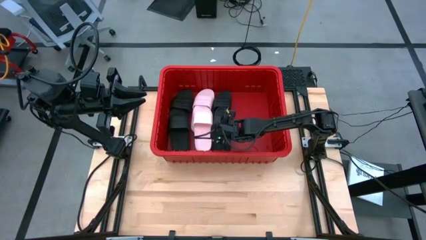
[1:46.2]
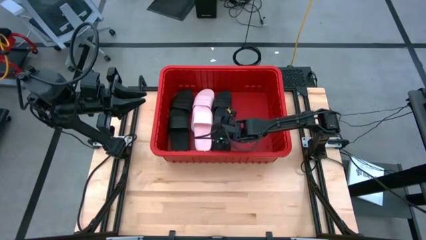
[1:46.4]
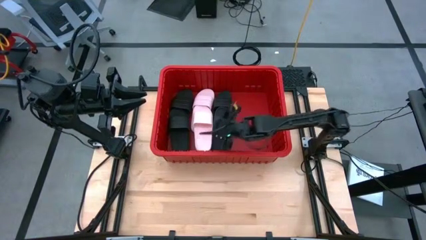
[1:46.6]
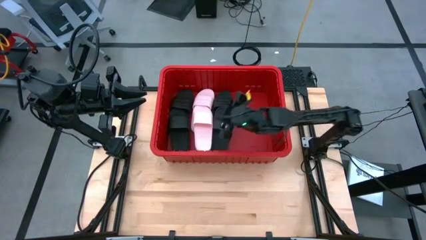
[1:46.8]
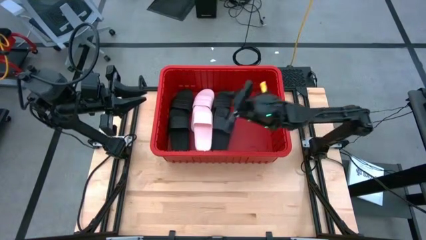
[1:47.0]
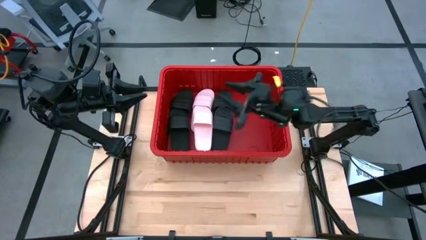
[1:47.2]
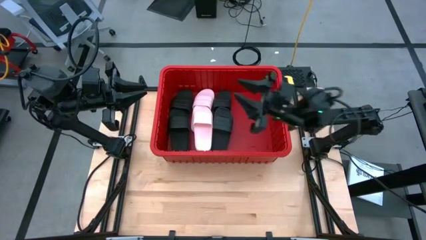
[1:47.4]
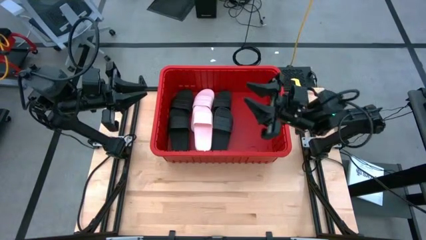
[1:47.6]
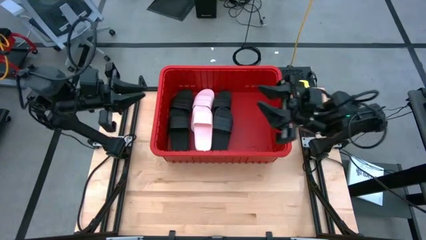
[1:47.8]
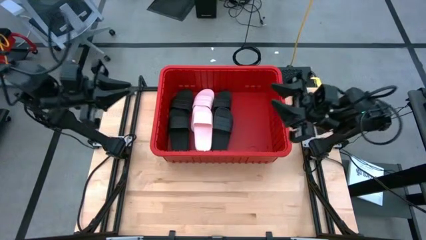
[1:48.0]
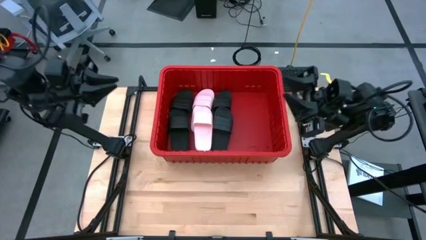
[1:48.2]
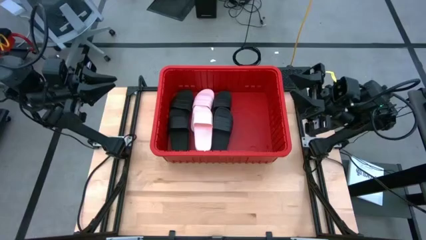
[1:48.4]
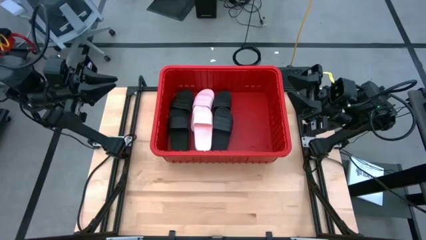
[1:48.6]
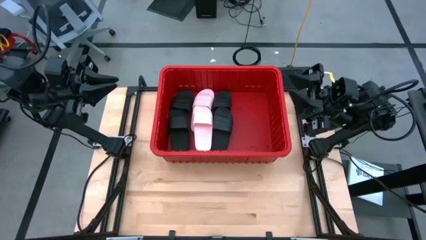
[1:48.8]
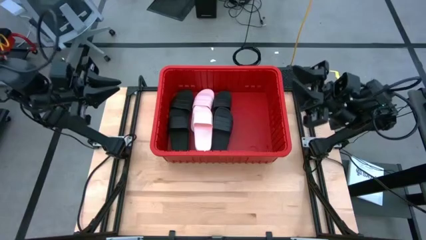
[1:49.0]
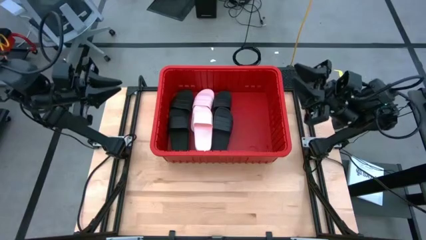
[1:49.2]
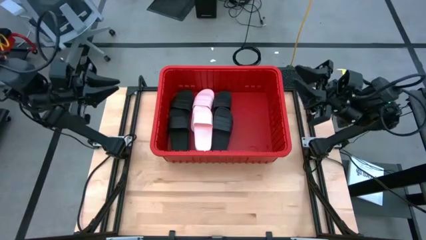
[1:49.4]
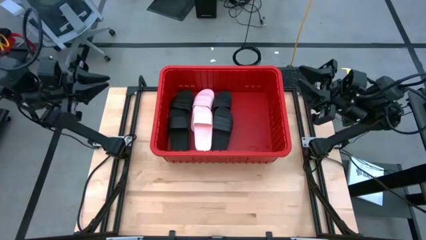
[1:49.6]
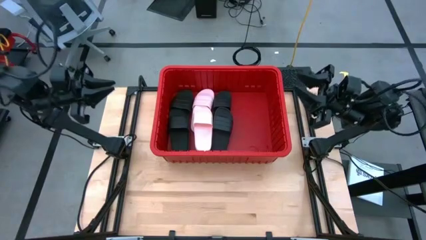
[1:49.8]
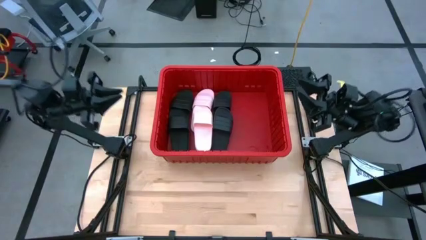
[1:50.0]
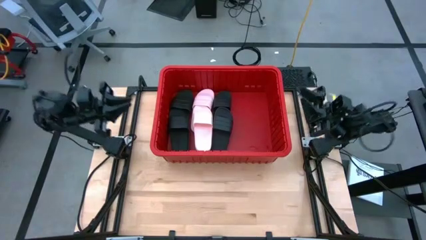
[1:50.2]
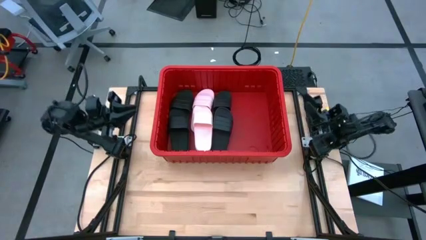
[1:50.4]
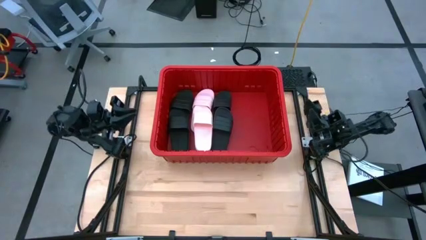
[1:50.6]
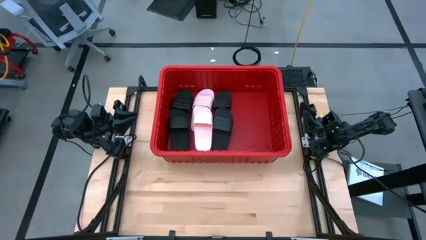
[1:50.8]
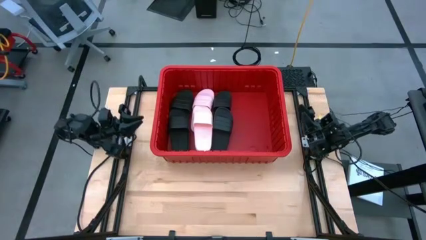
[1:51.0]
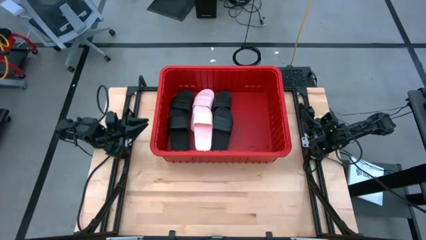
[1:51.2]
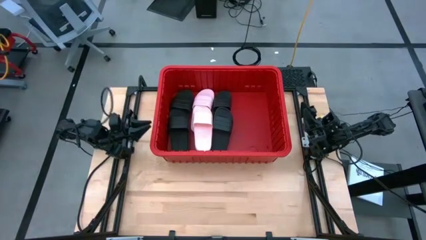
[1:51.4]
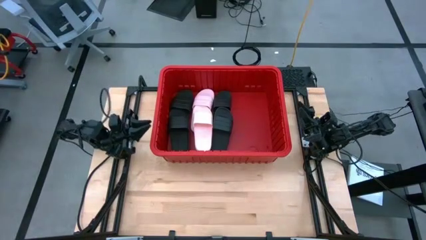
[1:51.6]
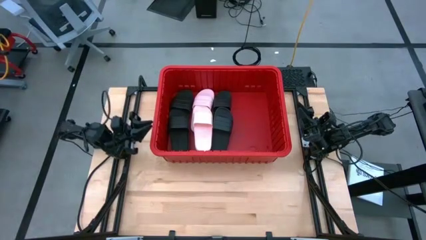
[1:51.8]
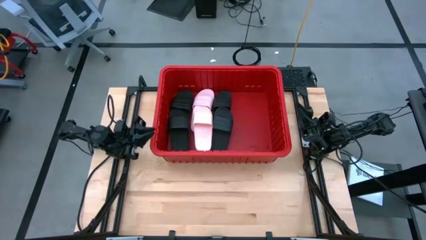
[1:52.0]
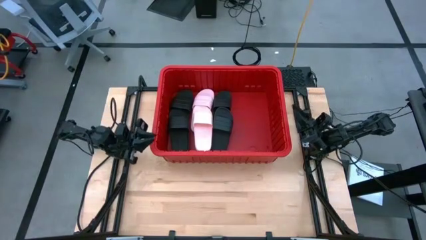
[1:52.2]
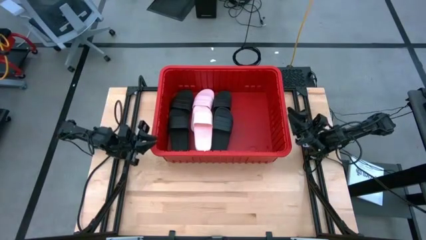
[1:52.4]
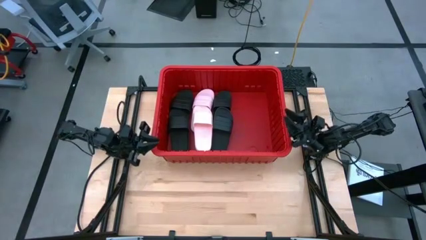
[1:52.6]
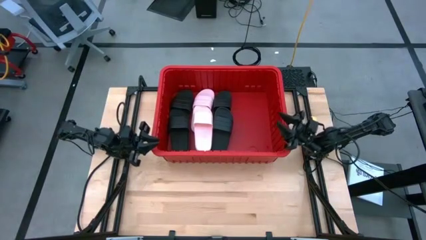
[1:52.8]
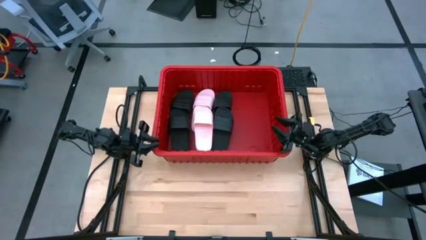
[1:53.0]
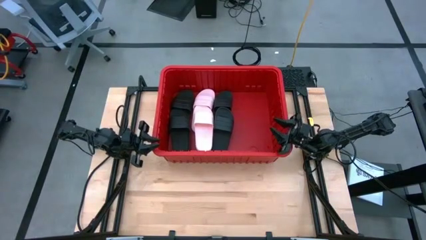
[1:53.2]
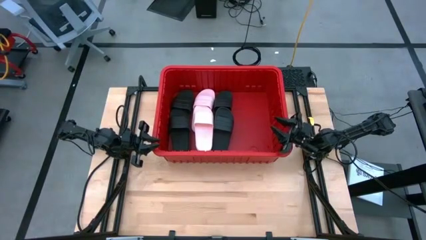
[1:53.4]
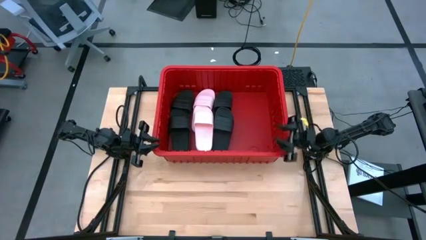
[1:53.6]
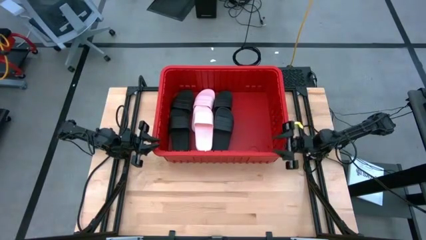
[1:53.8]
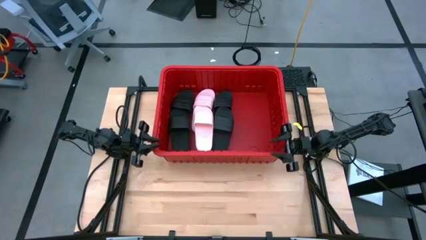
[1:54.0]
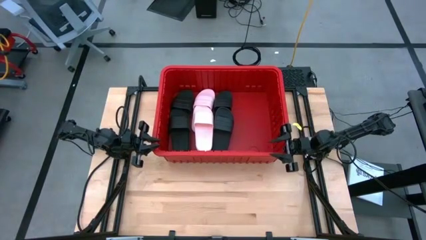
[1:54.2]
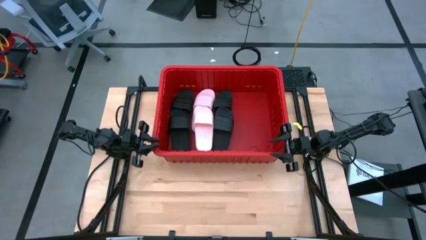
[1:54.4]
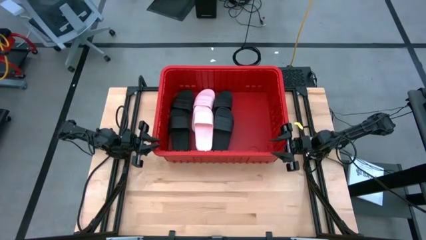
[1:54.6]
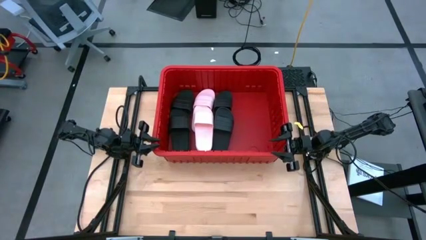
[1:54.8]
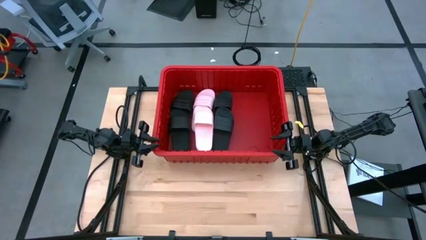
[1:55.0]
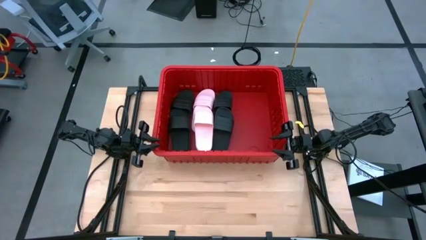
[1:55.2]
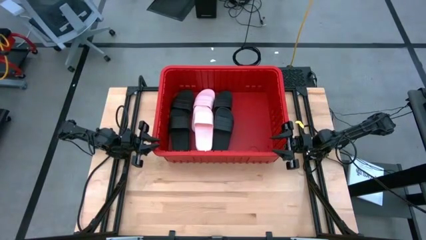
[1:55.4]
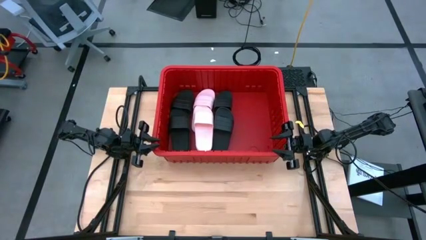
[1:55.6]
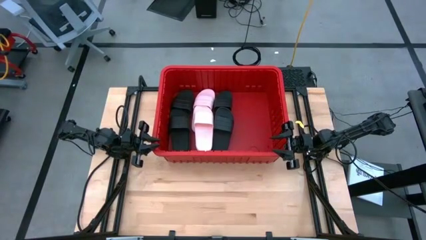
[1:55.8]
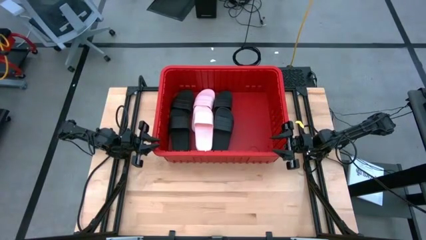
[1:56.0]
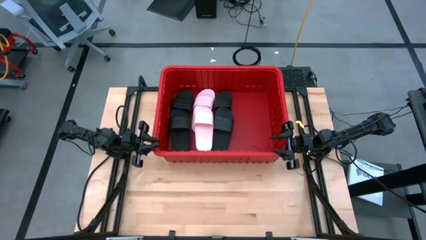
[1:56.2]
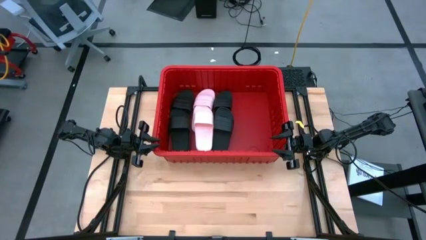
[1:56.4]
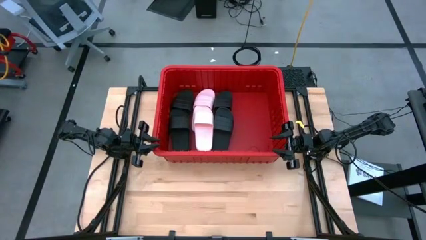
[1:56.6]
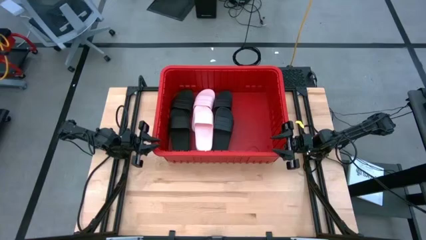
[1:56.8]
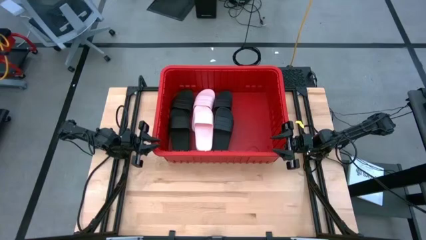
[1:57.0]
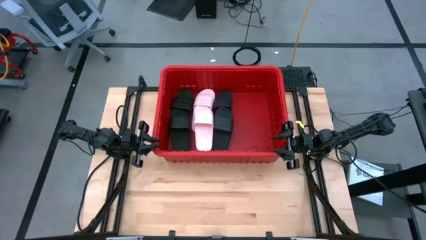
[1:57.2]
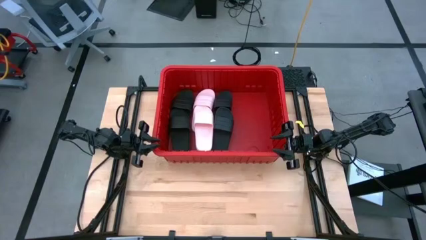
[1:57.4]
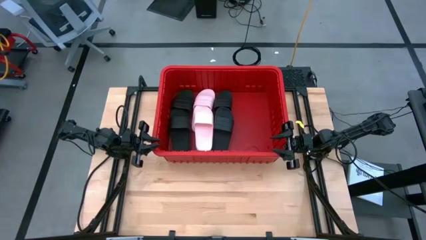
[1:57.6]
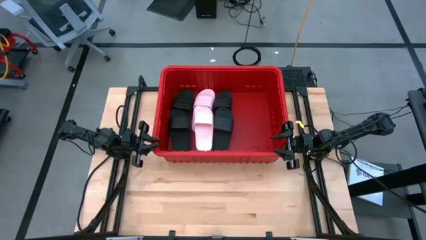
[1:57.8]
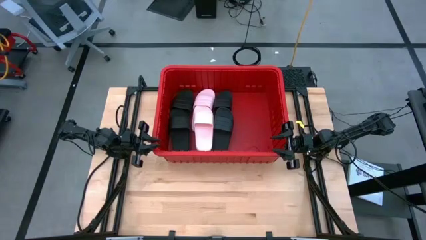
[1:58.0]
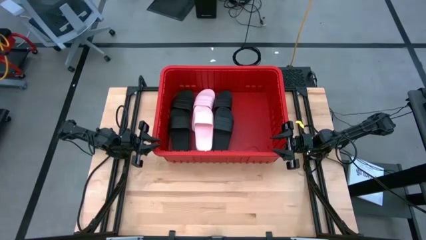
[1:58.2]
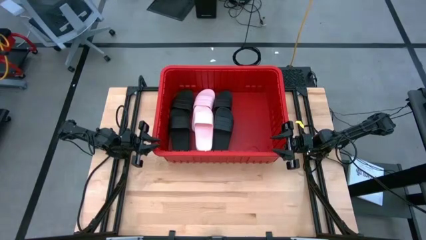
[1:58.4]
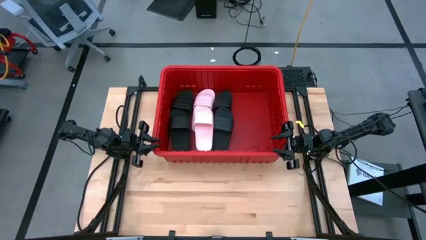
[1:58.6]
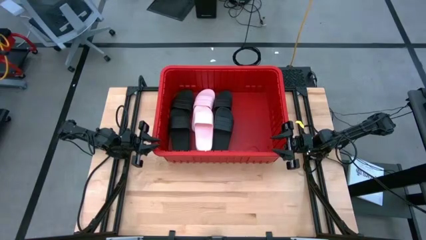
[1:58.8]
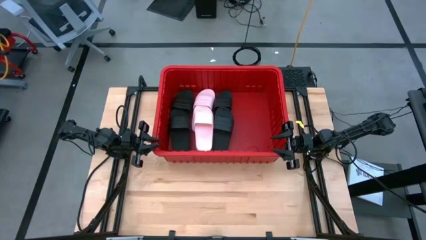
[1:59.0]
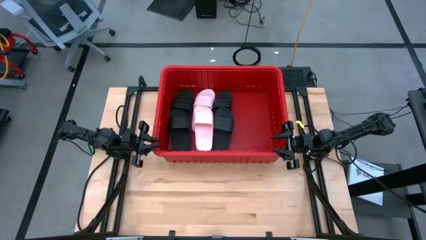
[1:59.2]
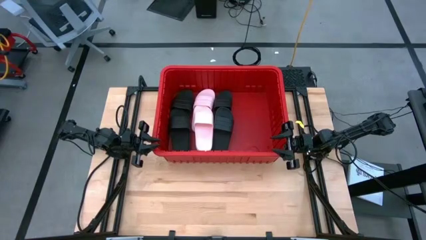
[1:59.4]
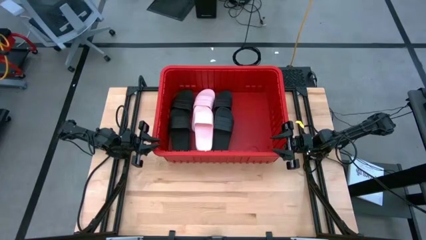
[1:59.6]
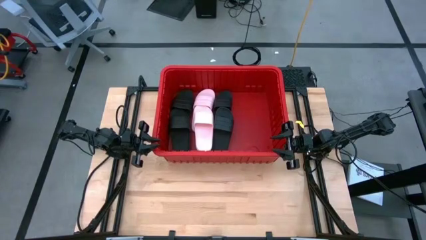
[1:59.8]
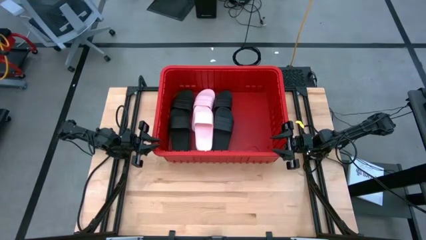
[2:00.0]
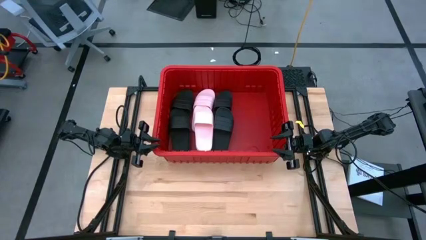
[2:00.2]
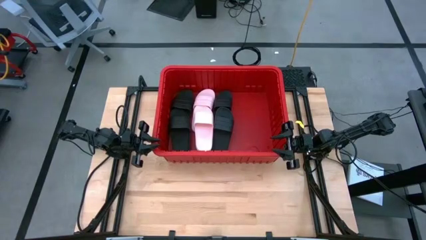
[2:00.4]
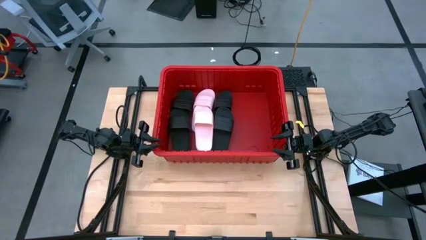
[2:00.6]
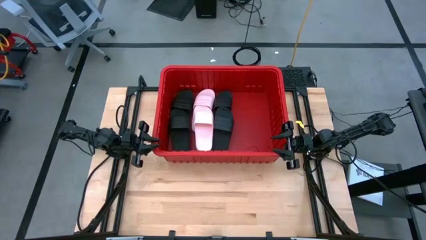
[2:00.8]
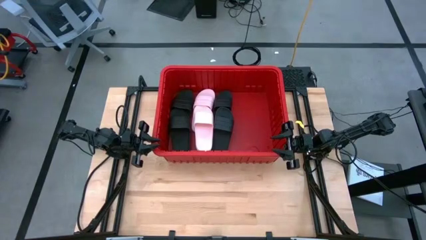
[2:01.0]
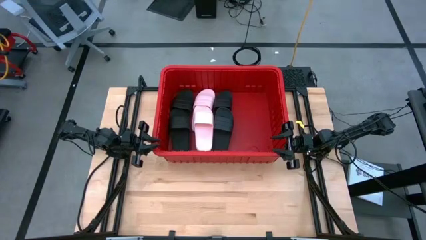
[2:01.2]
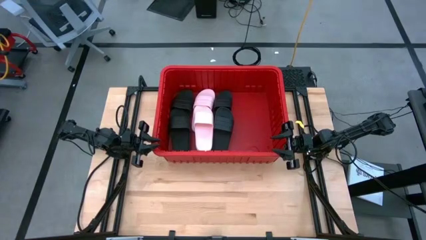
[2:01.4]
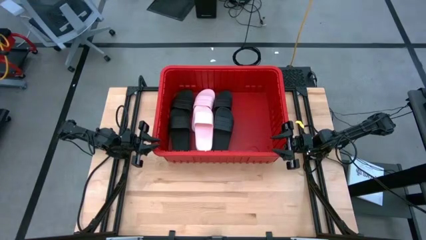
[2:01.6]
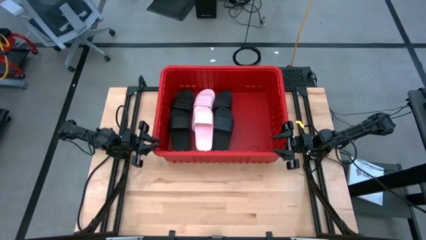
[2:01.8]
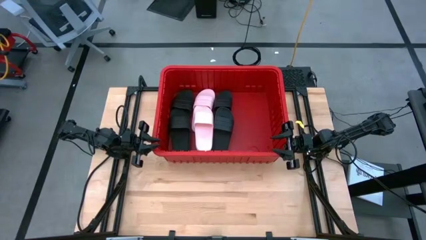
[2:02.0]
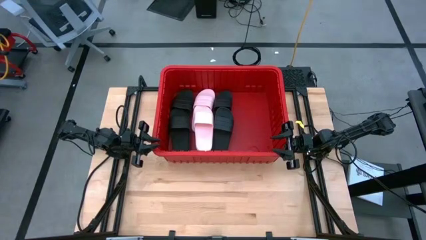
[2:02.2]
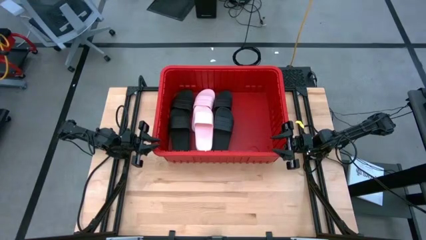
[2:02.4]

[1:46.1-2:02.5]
Task: Pick and place slides into bin
Return to Home Position
